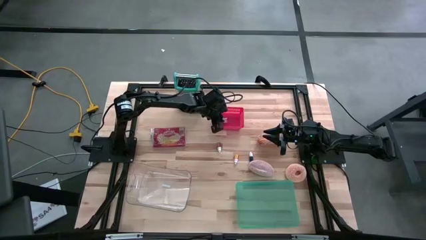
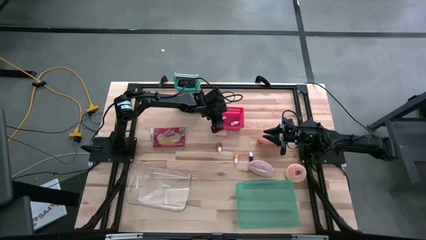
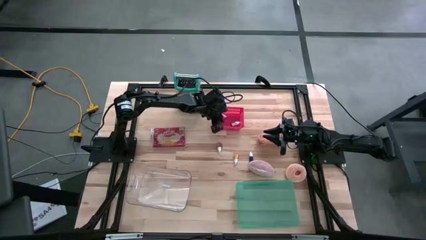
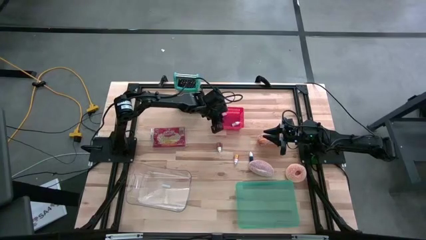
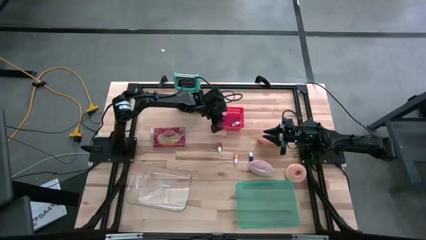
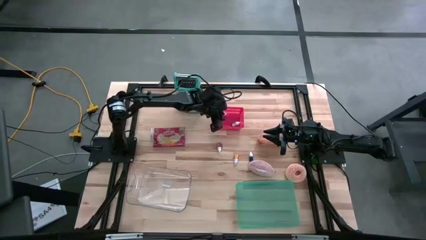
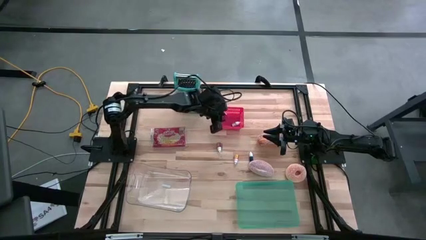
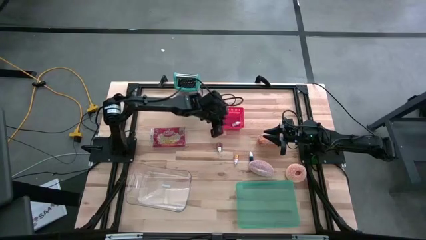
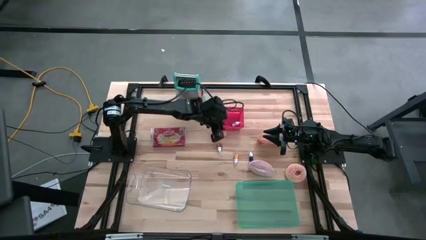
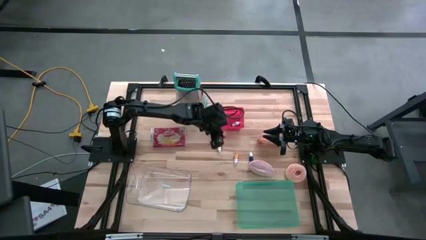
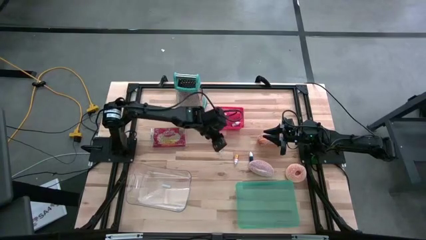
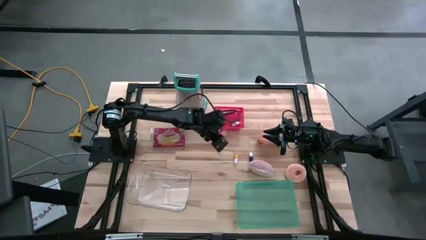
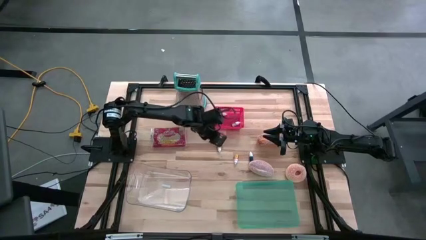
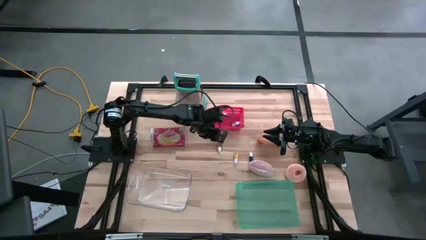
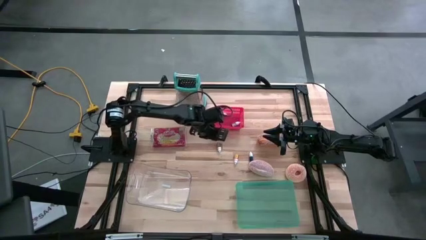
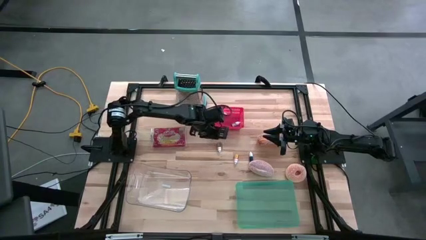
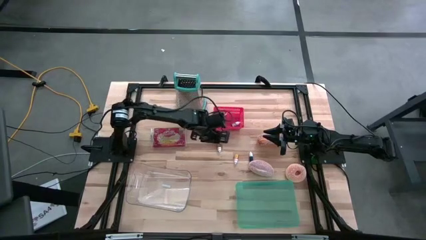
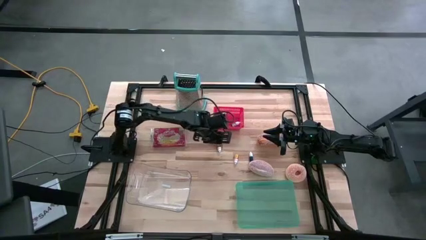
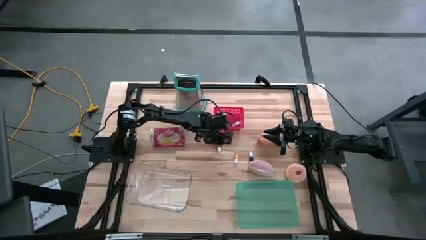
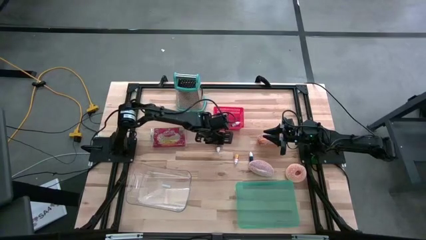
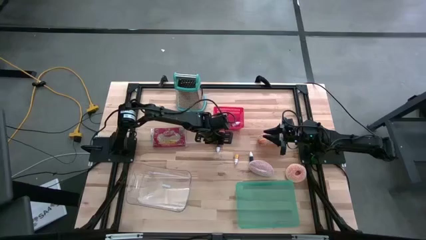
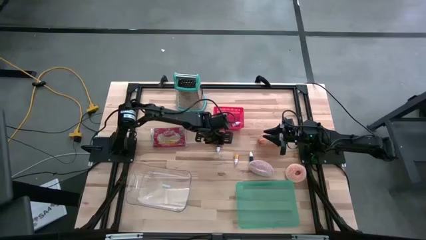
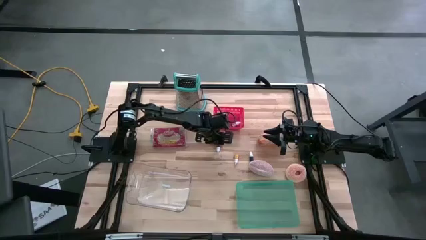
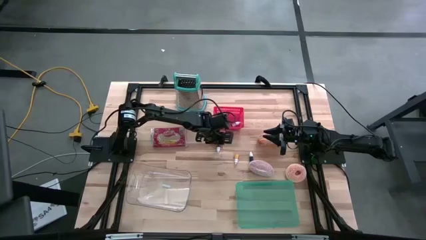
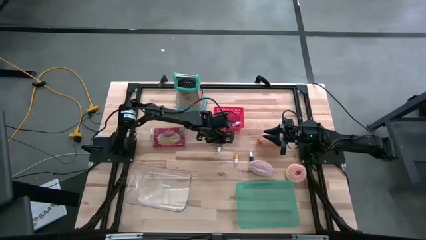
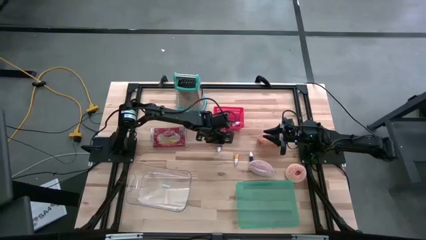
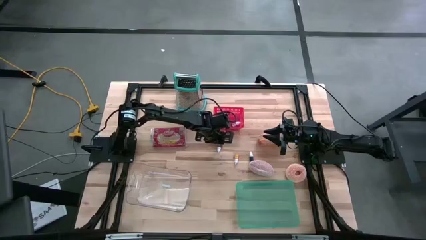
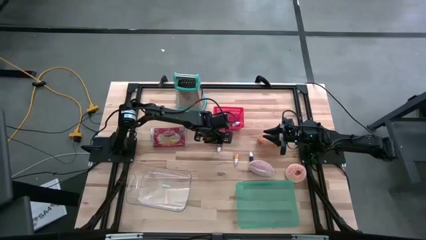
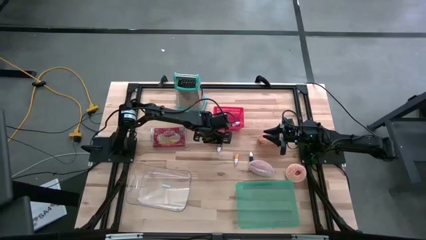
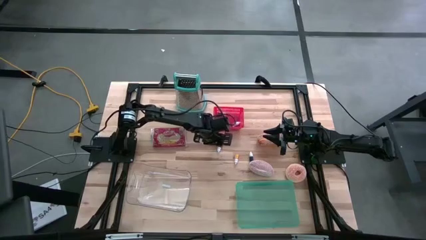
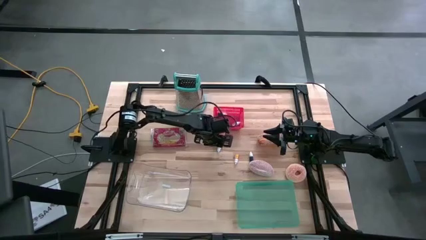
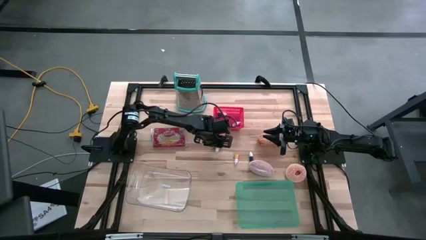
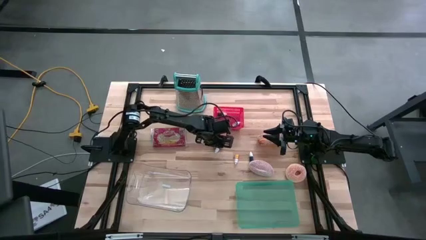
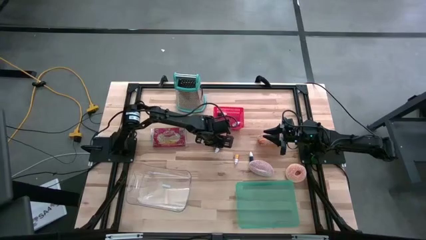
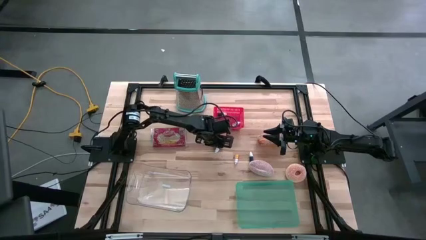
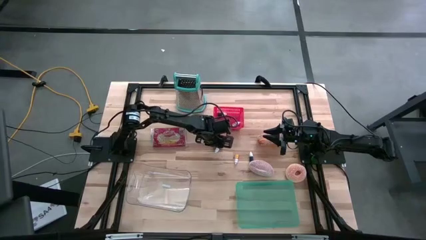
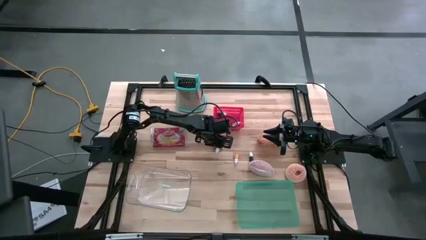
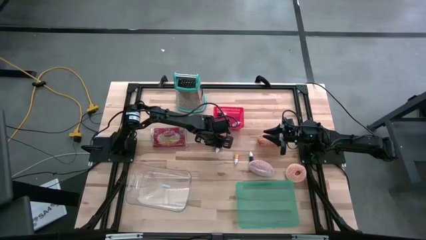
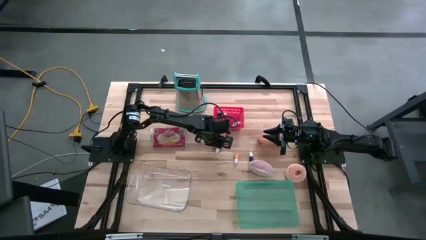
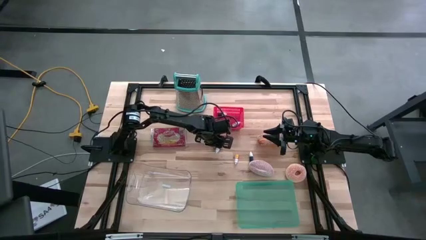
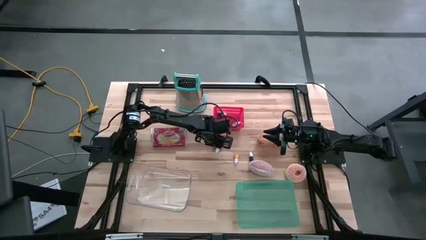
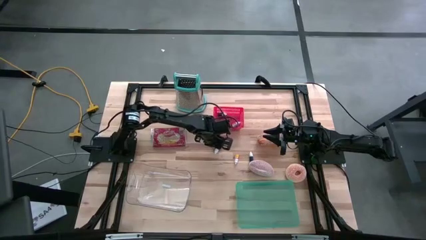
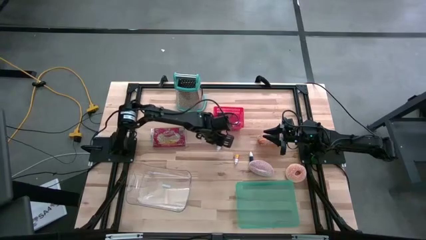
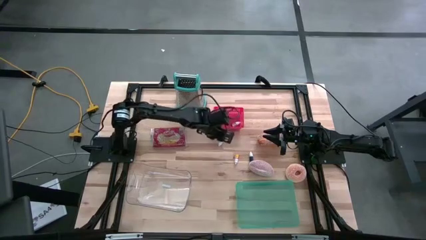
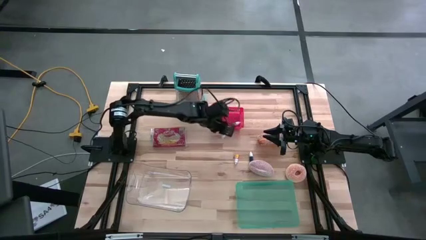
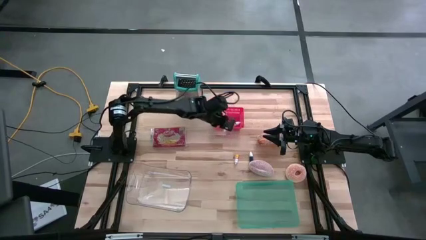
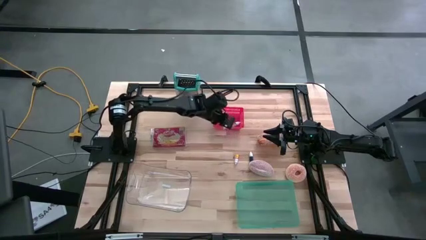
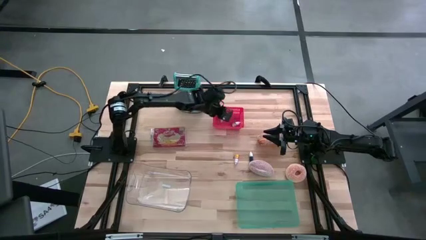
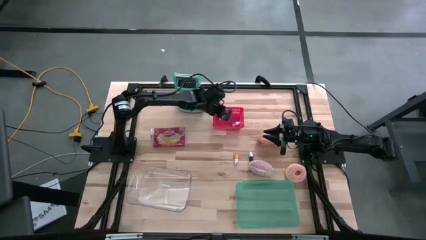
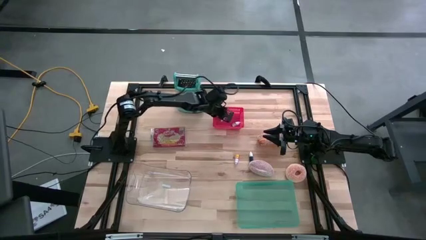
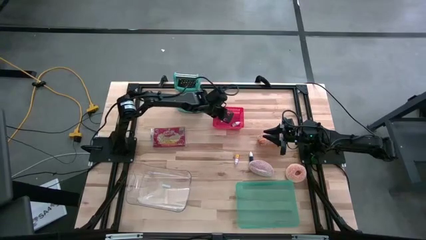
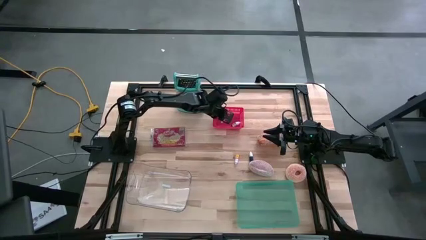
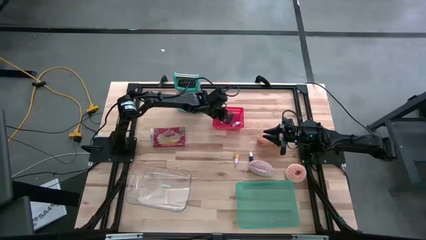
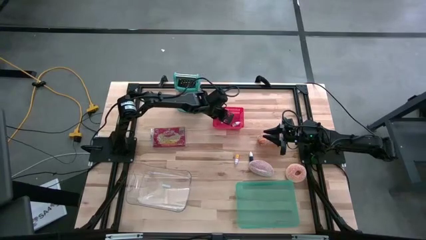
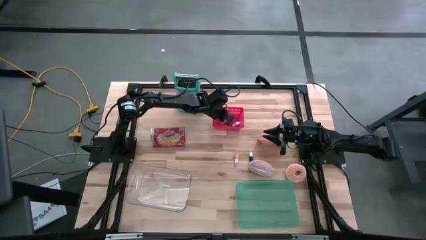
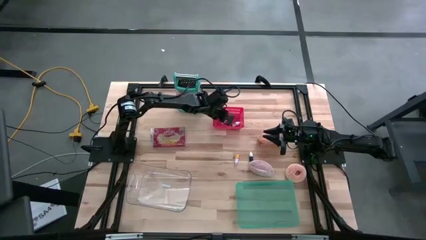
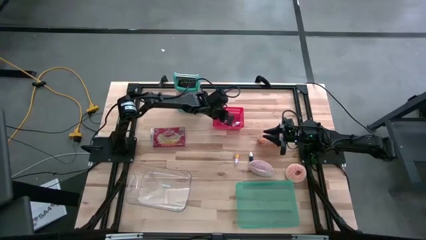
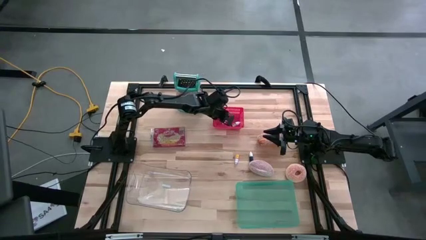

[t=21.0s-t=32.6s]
Put the food coloring into the red bin
